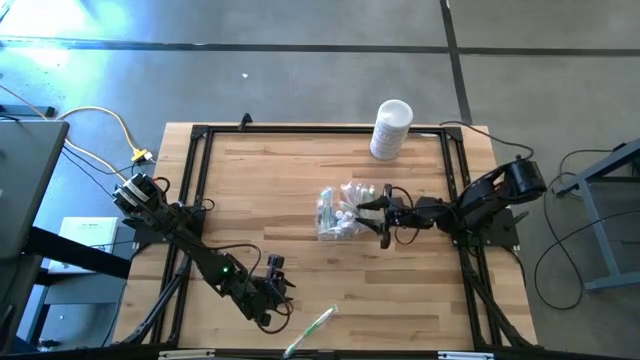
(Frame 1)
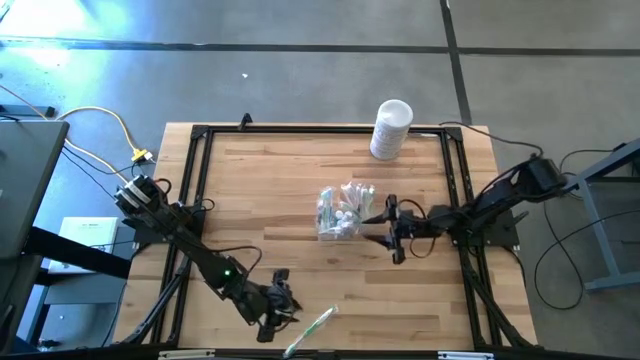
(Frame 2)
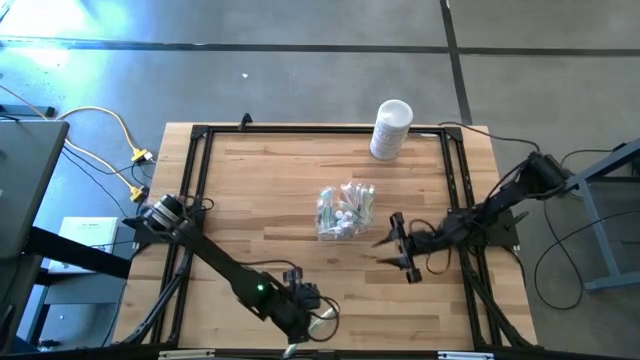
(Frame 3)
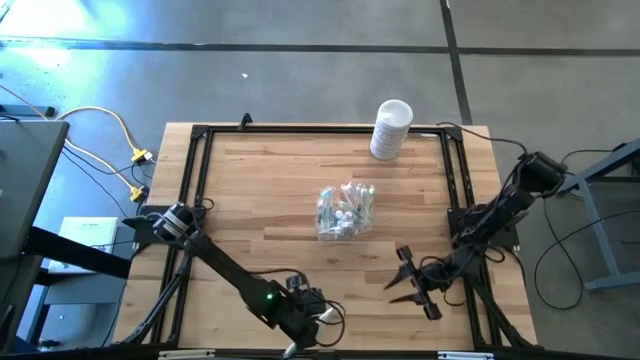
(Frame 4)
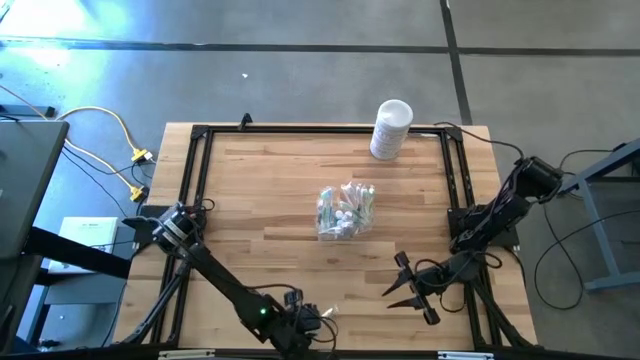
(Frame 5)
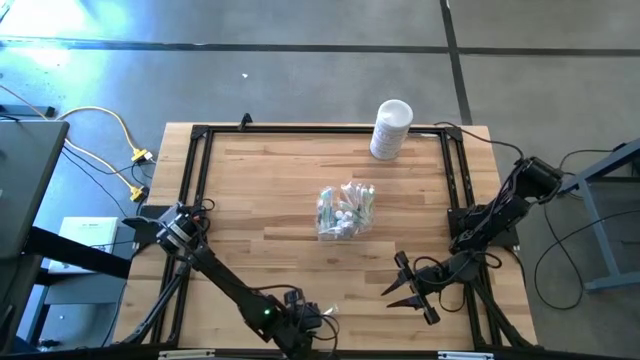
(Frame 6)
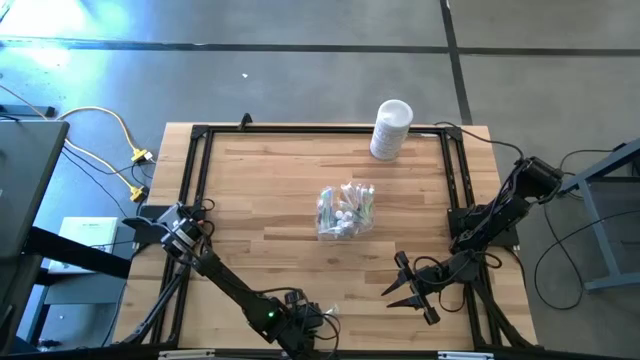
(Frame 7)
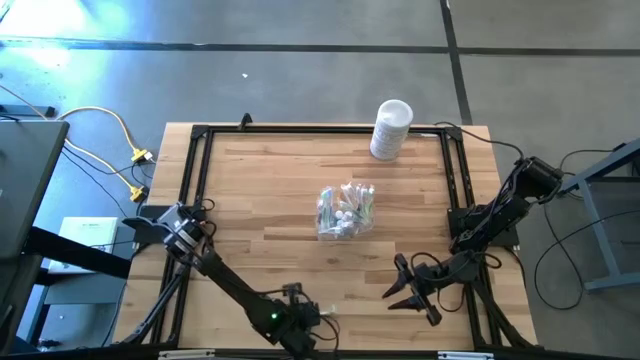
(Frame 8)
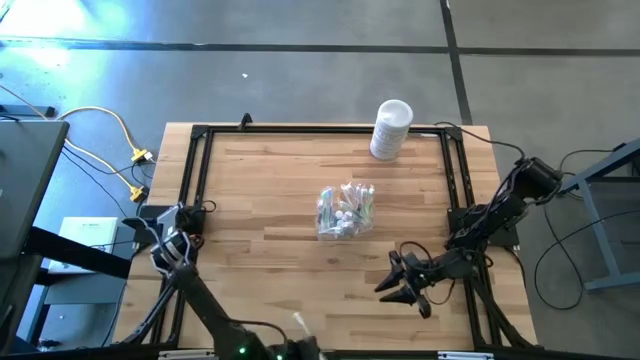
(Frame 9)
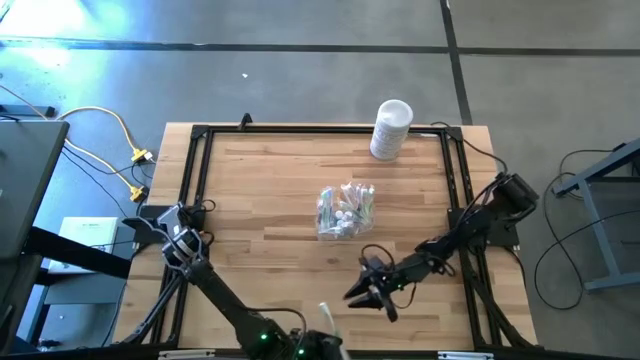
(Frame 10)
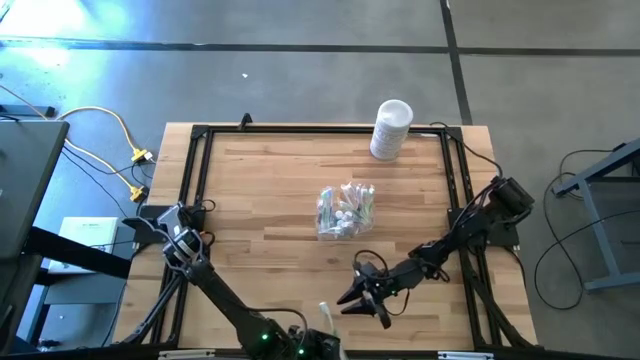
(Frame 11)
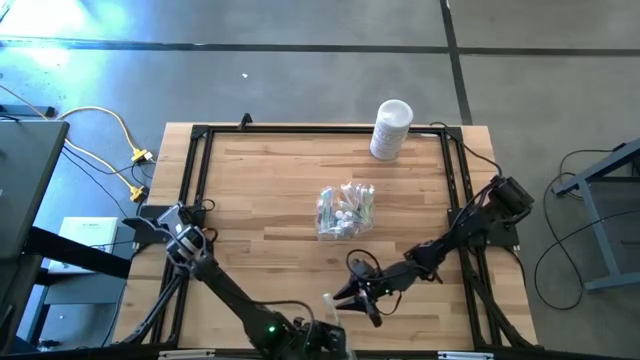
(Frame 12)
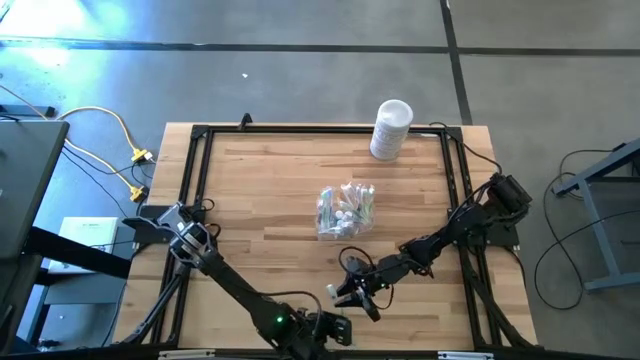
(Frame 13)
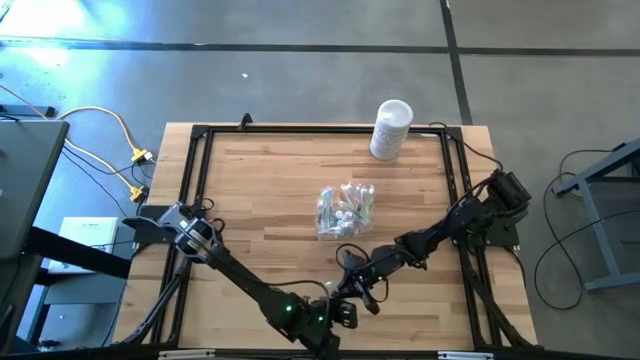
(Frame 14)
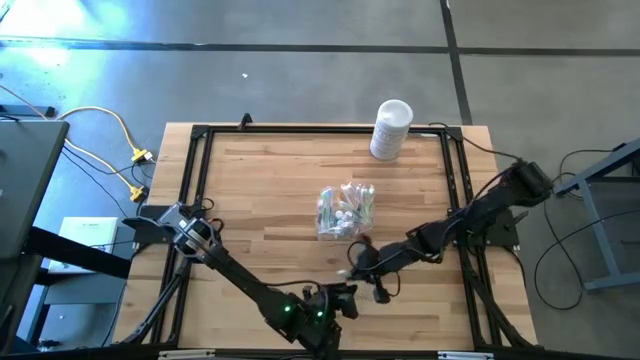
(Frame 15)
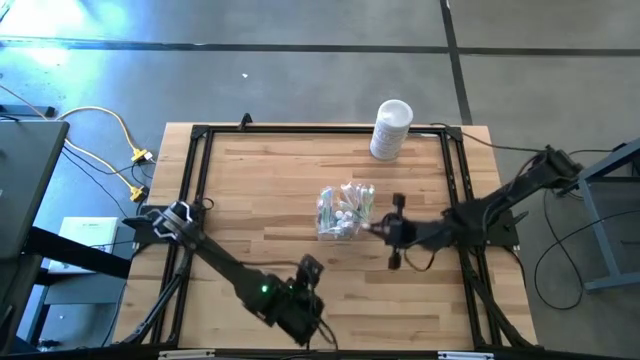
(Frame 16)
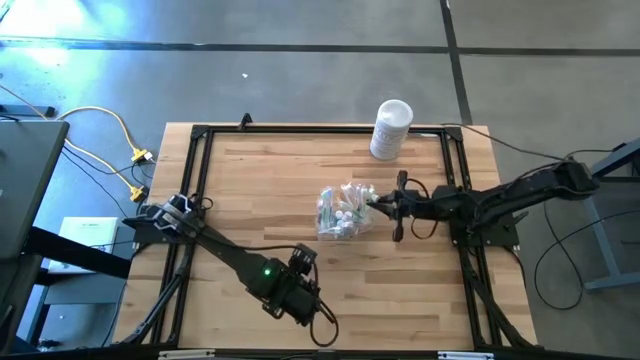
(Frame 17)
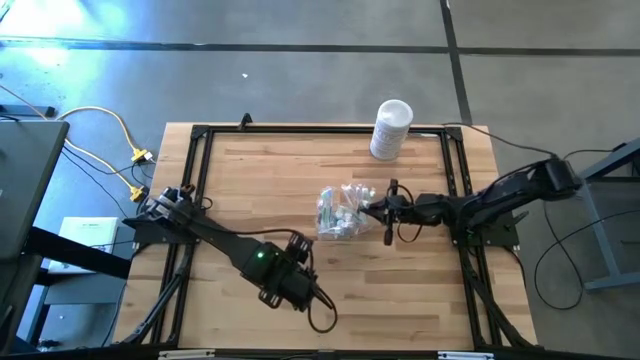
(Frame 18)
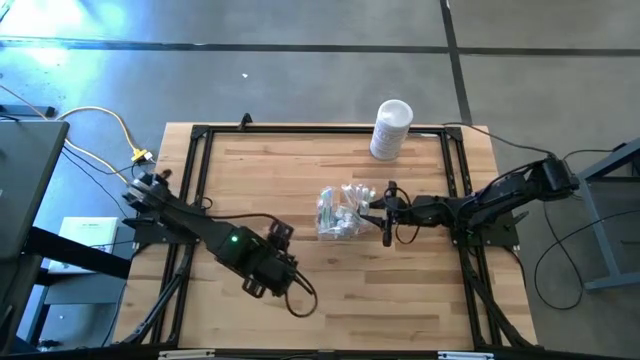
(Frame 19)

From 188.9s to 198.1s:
Task: Pick & Place toothbrushing station
Put the green toothbrush into the transparent organizer

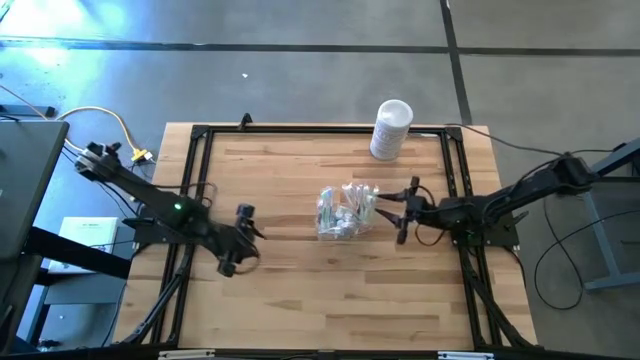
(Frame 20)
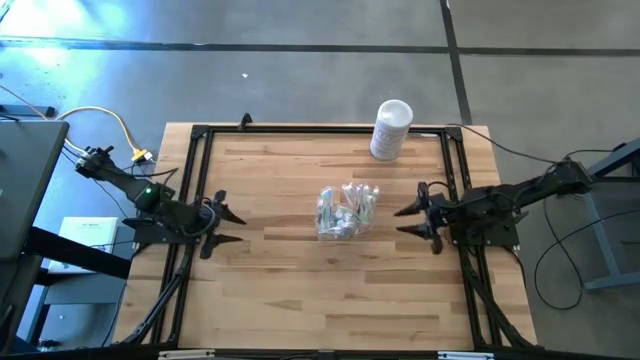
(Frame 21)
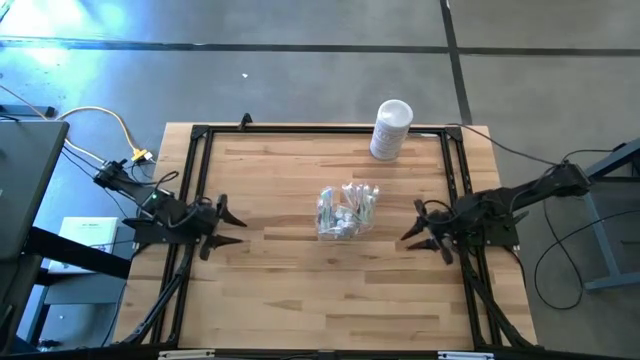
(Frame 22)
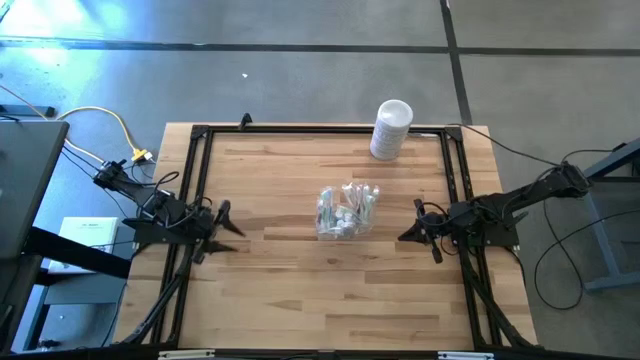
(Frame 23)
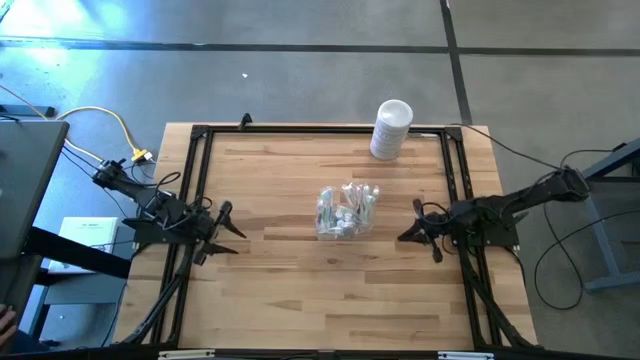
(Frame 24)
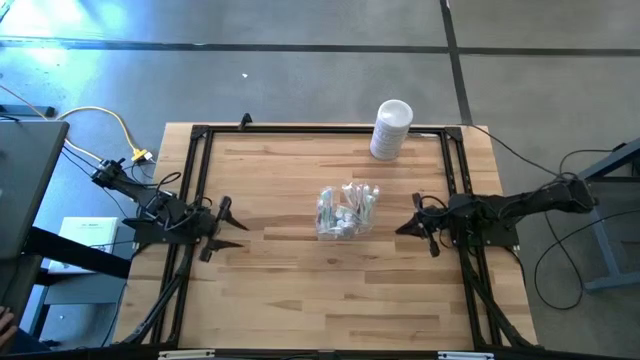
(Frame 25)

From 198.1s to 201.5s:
Return to Home Position

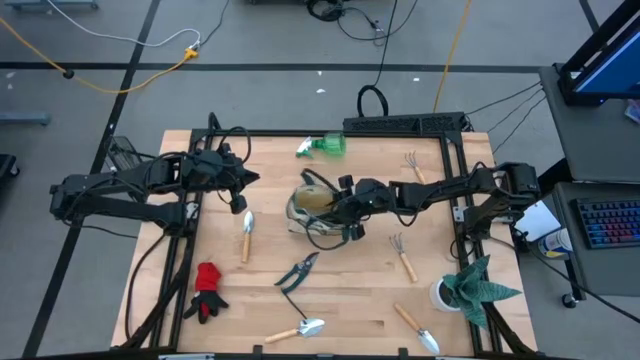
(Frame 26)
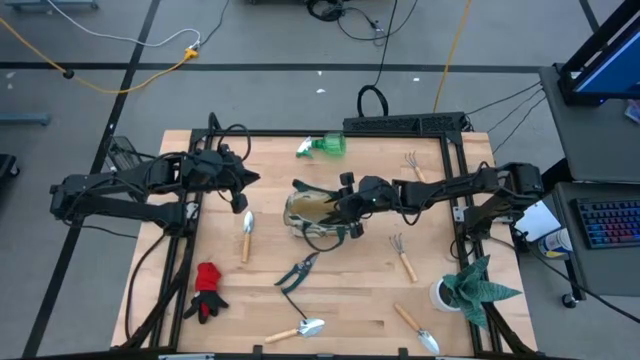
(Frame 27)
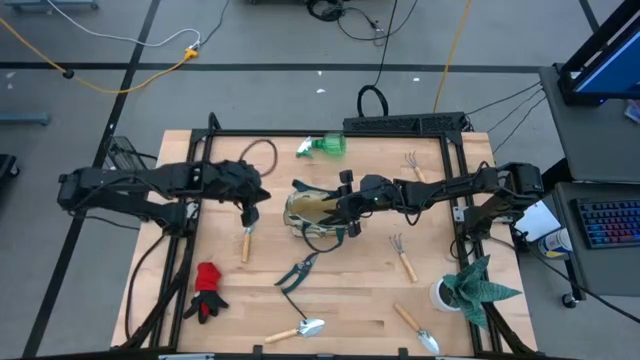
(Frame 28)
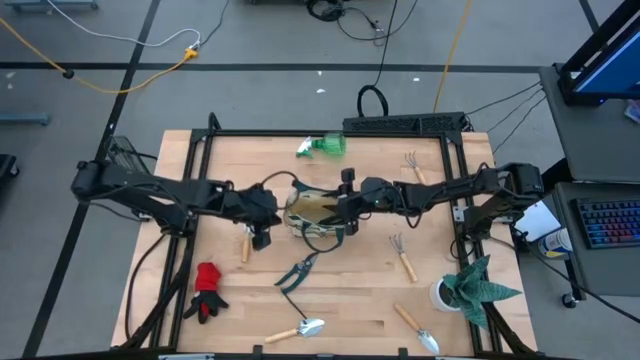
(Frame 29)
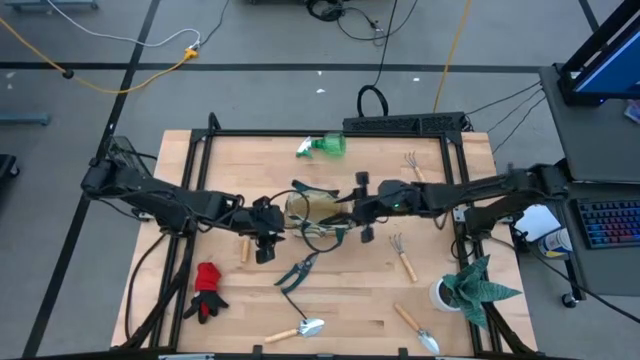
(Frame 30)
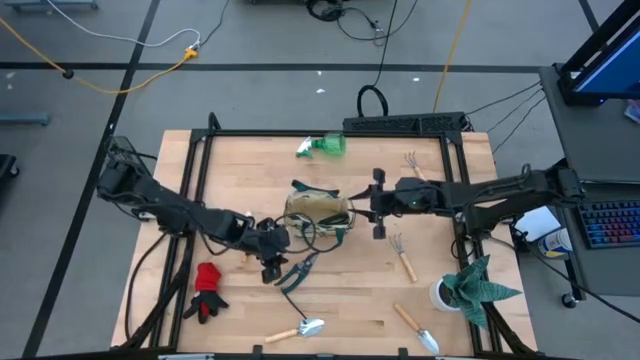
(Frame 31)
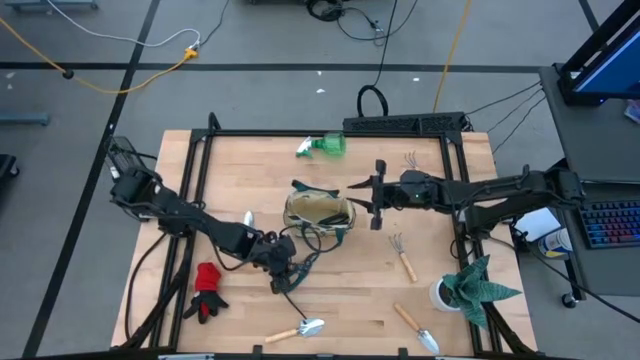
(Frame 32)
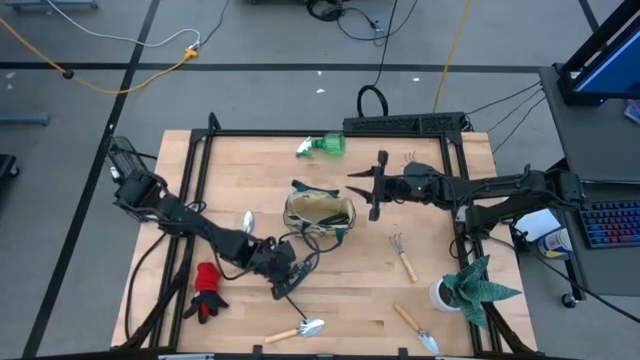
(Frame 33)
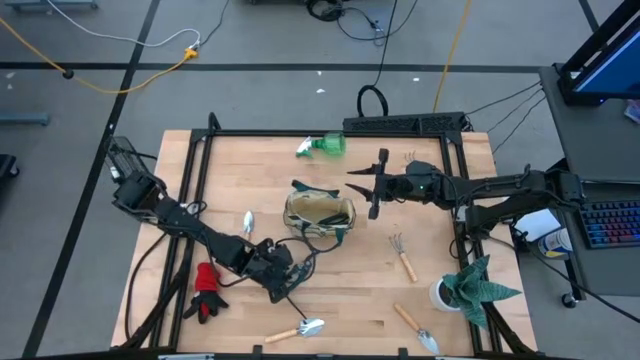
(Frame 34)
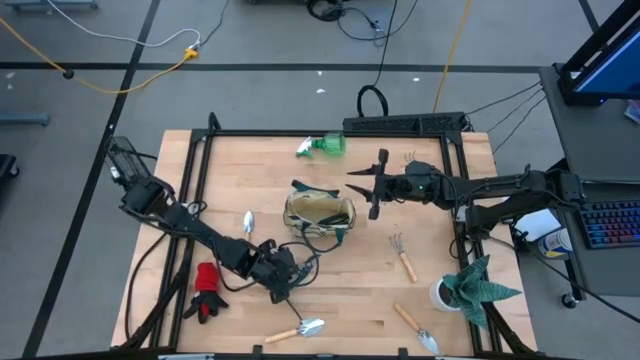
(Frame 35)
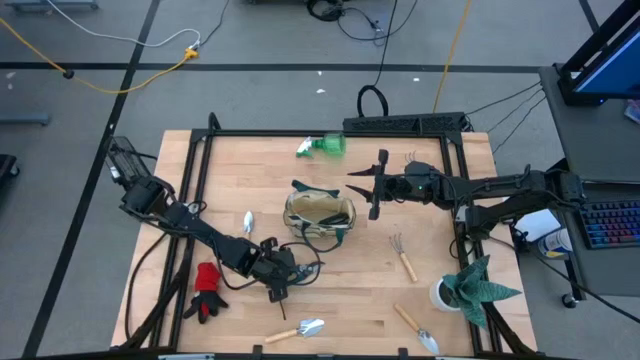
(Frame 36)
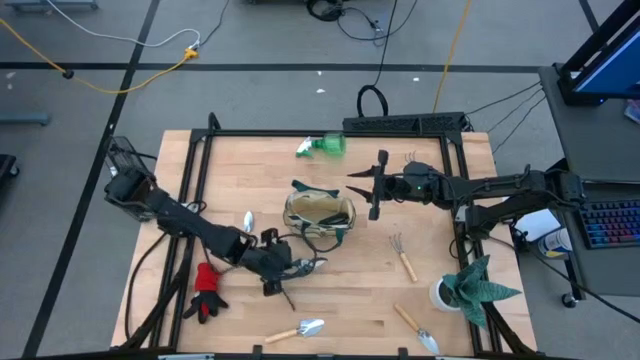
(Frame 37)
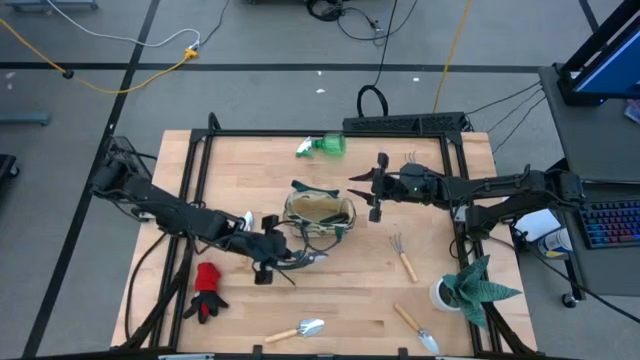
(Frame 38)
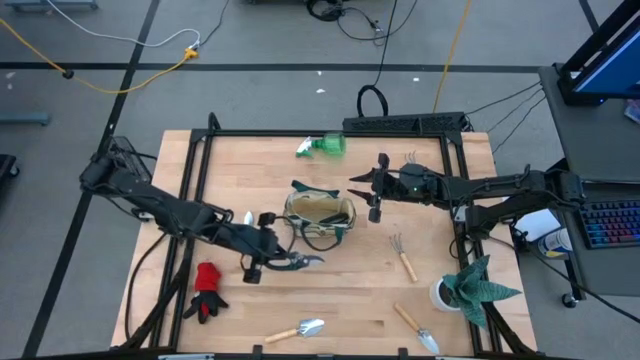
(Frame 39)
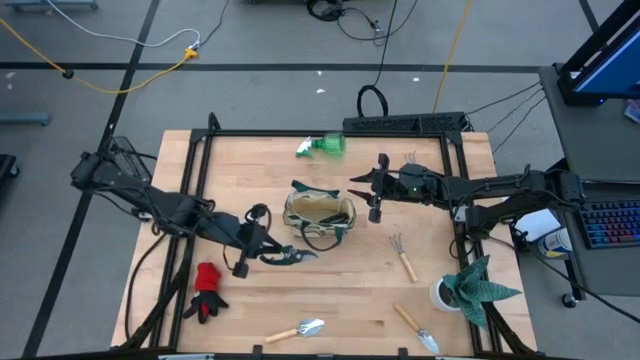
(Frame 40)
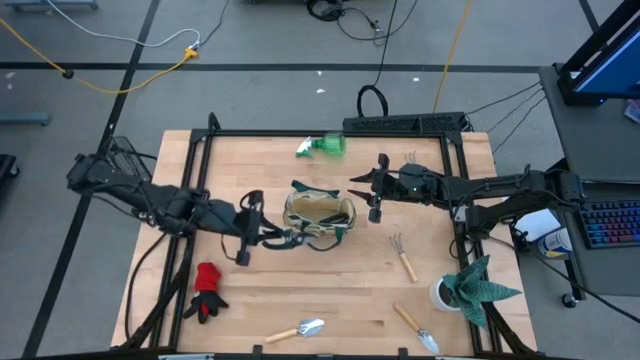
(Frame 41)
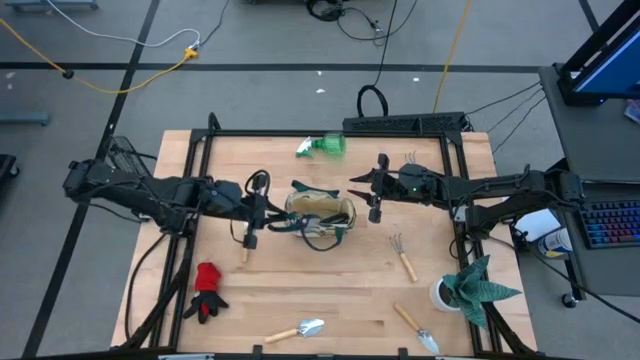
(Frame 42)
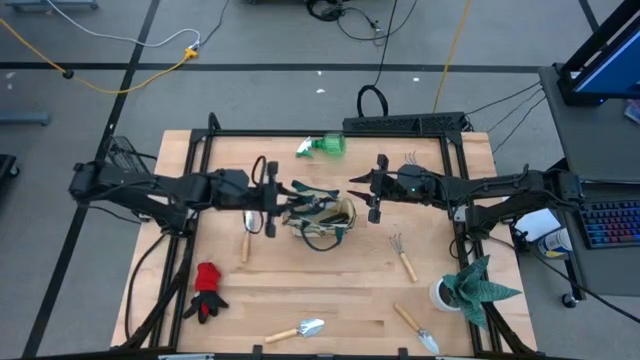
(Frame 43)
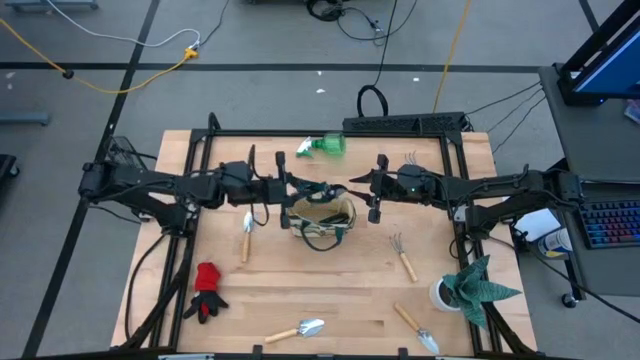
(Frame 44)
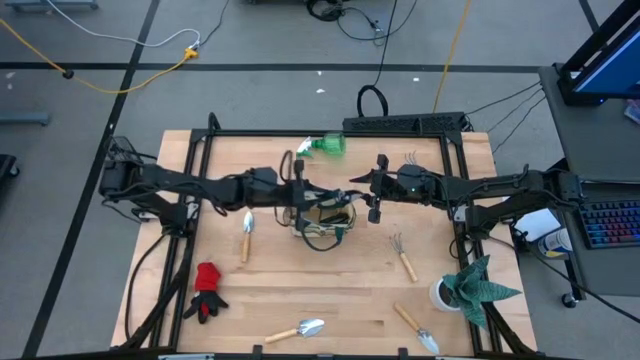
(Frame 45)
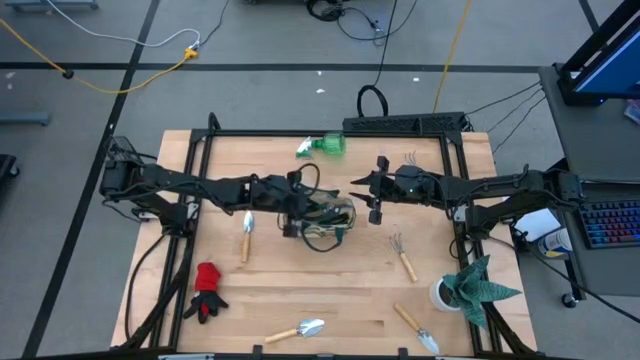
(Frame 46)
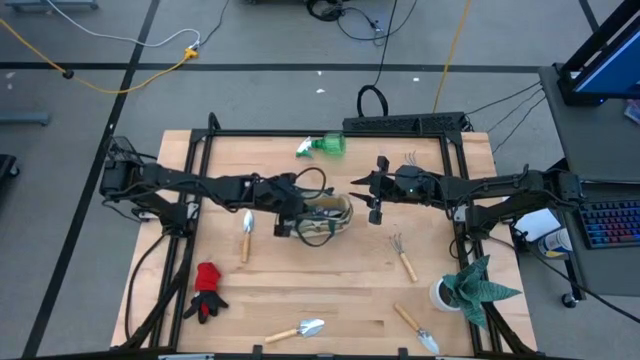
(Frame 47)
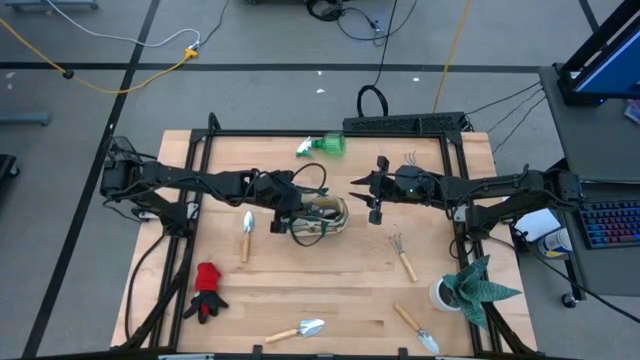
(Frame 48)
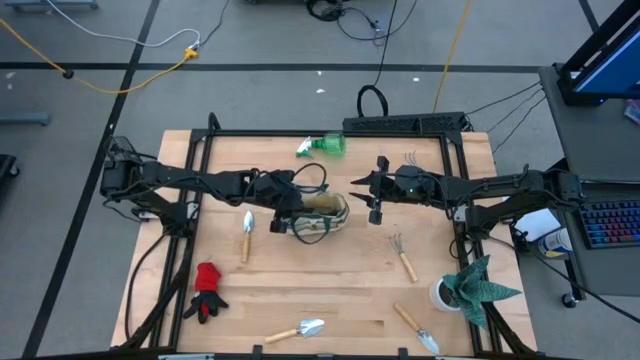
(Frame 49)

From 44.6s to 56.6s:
Task: Pick & Place Garden tools in Gardening bag
Put the green shears into the brown gardening bag
